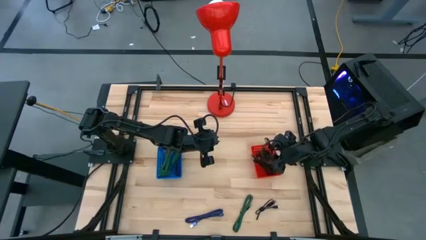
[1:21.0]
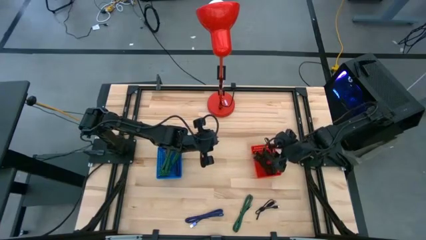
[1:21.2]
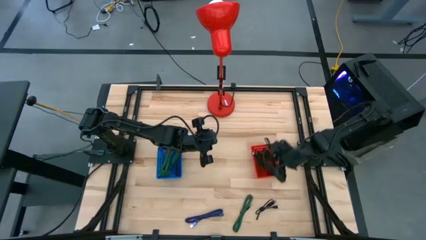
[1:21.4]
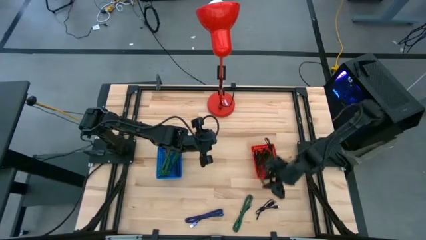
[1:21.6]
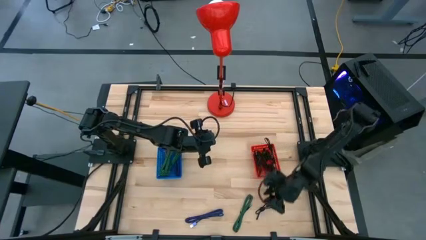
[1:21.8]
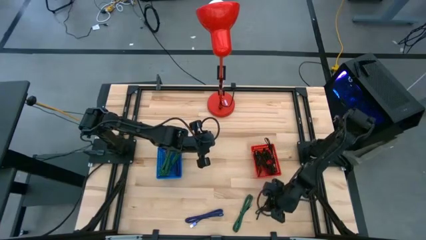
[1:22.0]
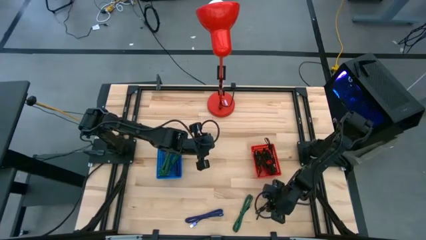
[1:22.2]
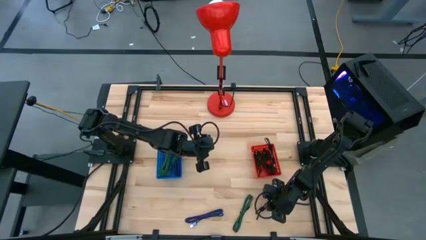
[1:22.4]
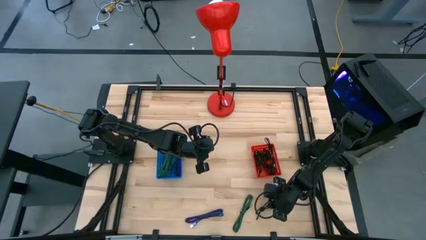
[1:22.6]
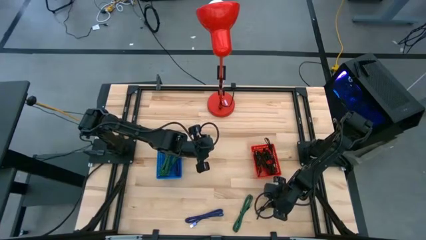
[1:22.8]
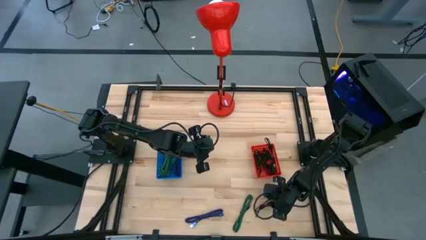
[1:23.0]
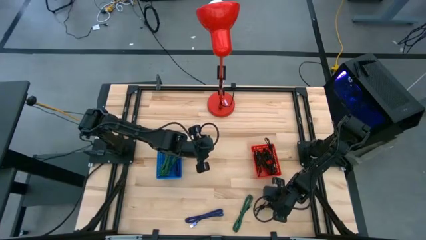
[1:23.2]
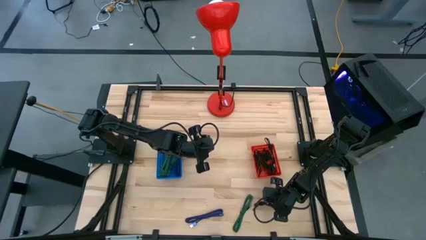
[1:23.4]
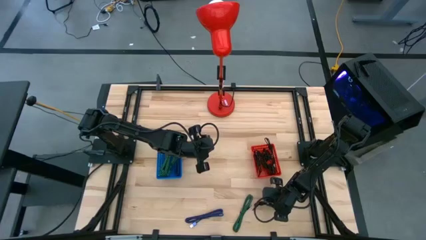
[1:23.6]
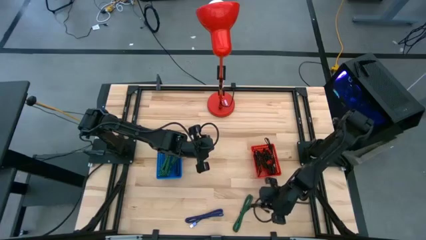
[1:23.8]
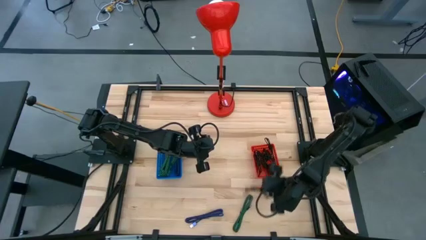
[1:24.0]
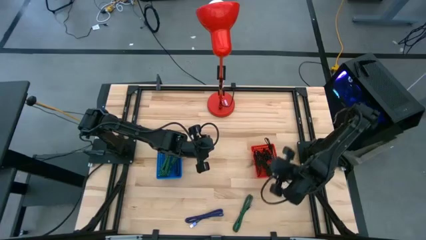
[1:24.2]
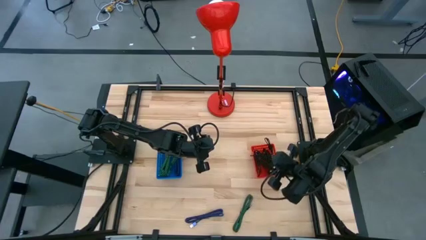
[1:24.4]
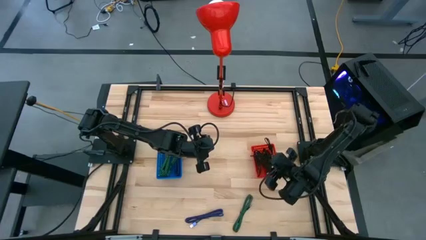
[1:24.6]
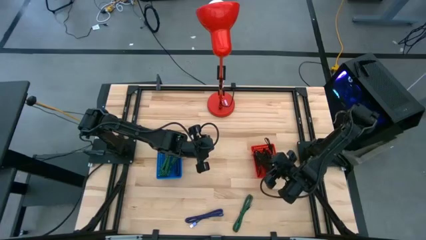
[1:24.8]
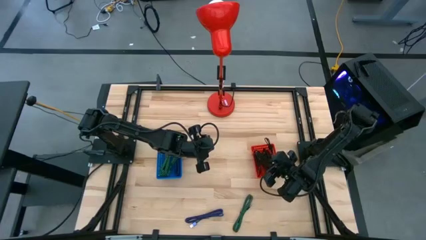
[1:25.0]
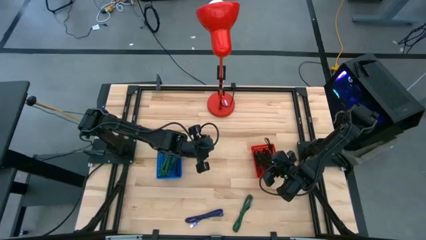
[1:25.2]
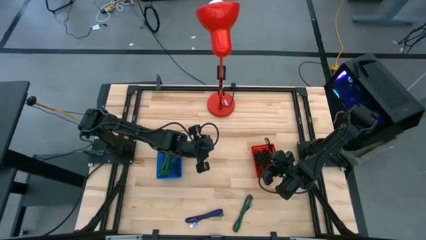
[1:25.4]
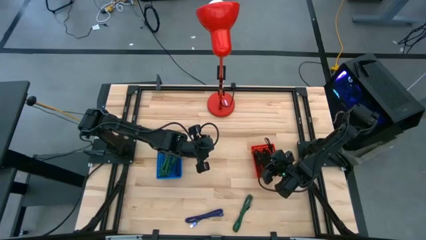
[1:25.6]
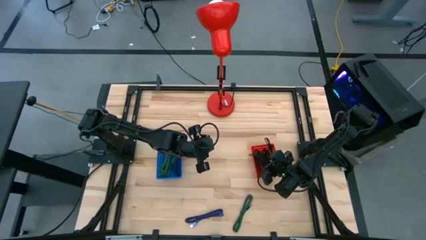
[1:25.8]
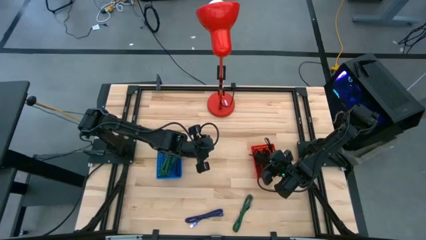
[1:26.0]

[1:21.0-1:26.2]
Task: Pick & Place USB Port
Put the black charger cable into the red bin

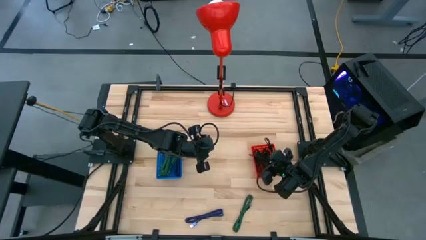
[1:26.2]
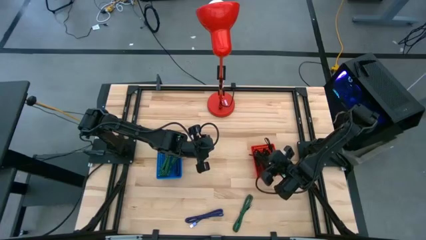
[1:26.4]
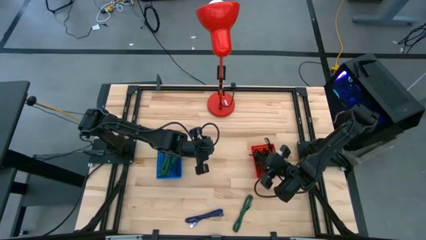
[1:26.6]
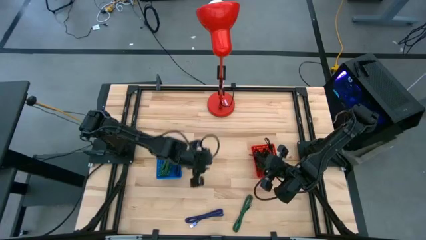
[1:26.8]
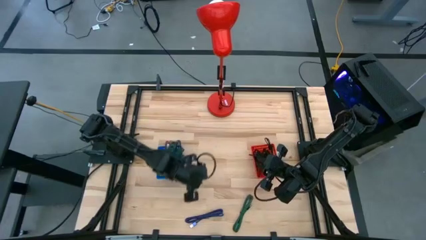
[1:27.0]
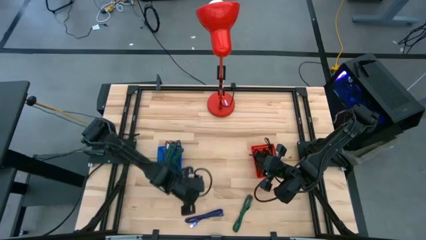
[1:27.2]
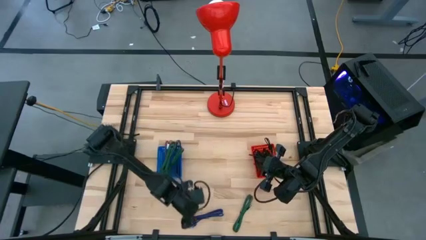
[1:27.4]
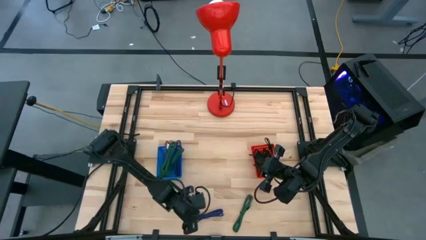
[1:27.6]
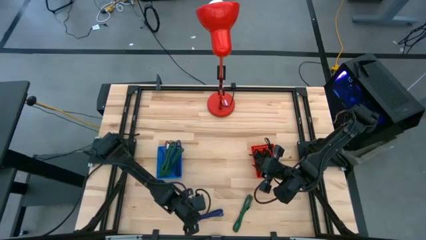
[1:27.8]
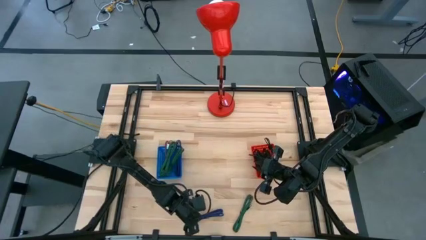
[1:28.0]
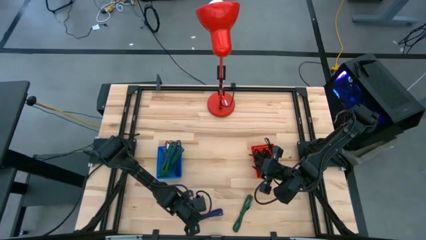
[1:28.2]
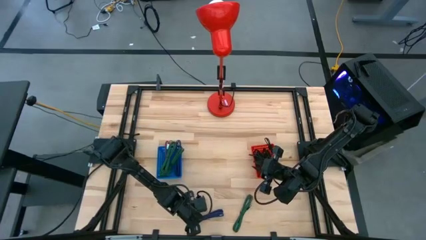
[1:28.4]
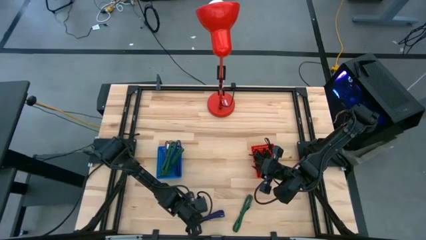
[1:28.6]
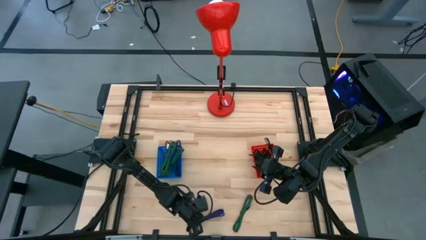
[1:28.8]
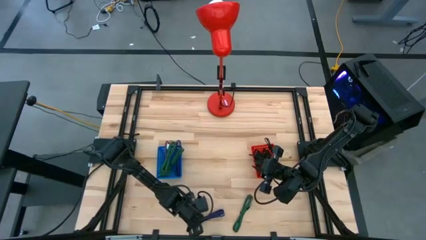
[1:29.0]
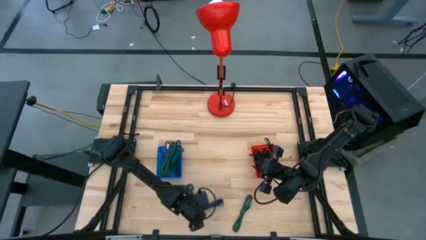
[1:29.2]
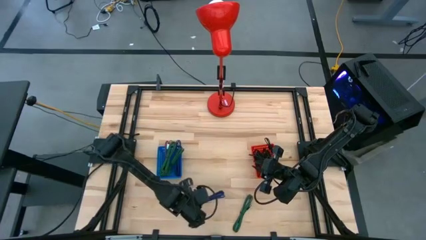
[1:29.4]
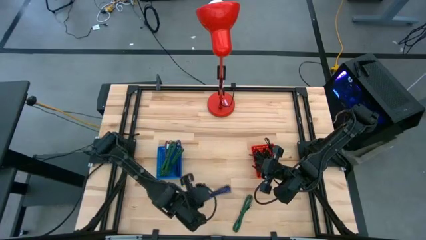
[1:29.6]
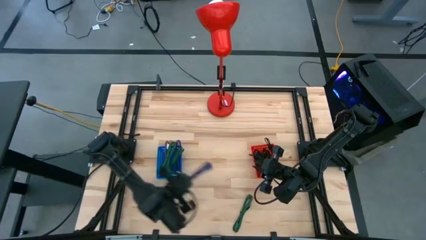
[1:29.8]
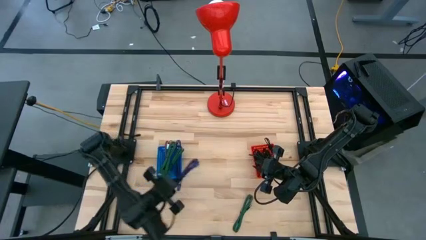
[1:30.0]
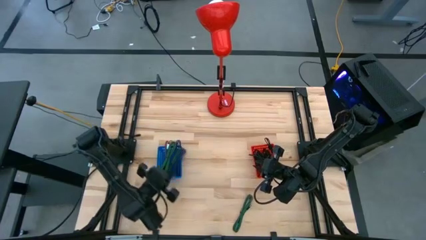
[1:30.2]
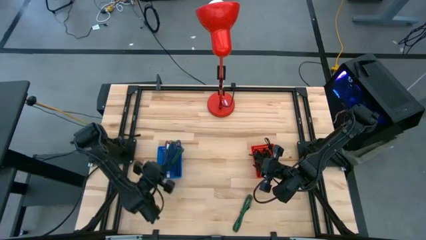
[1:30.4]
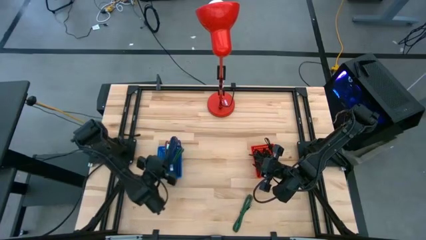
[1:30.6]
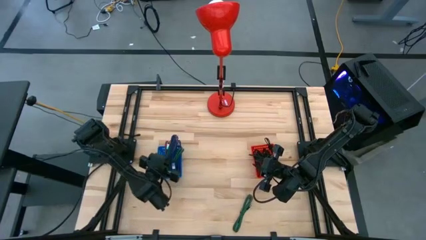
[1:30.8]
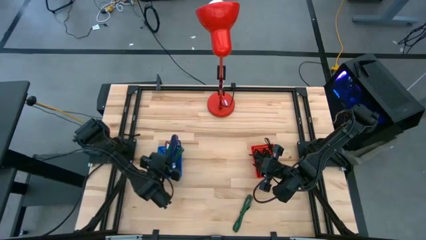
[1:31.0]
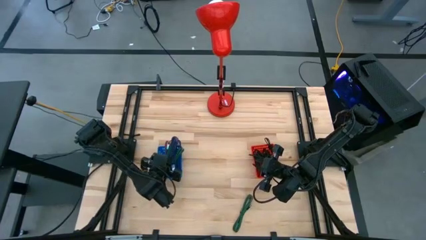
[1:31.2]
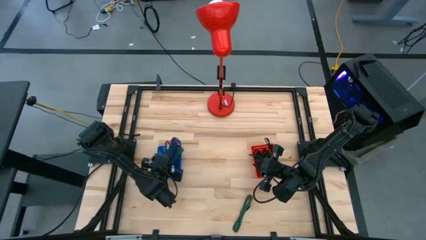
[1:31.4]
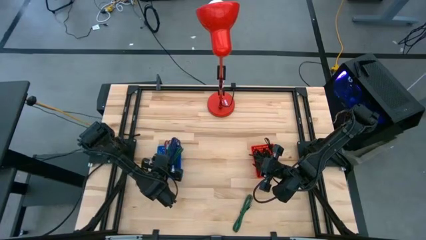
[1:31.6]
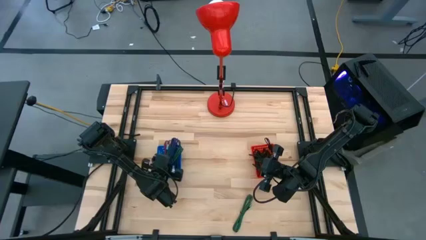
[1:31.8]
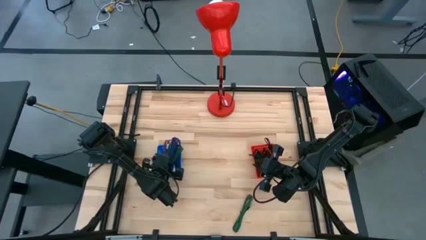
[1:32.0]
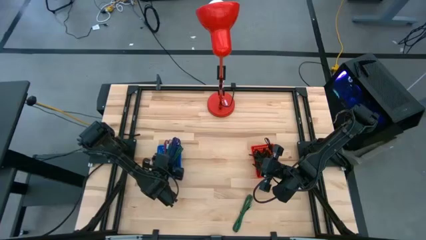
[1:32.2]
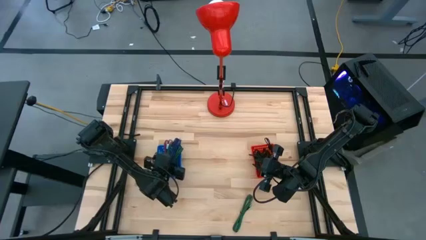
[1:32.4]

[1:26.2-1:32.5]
Put the blue and black charger cable into the blue bin

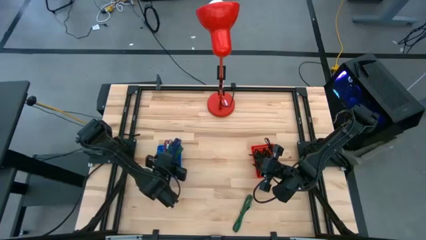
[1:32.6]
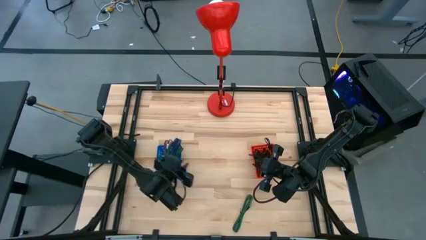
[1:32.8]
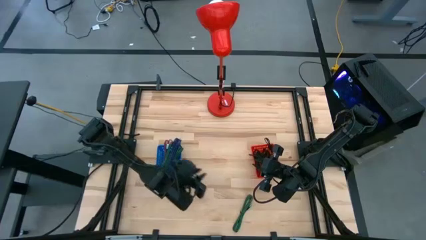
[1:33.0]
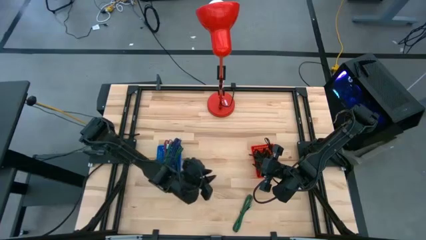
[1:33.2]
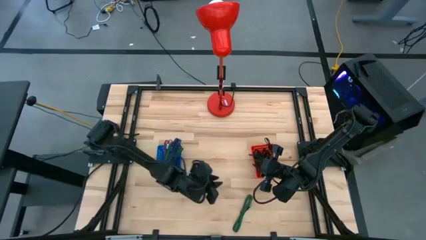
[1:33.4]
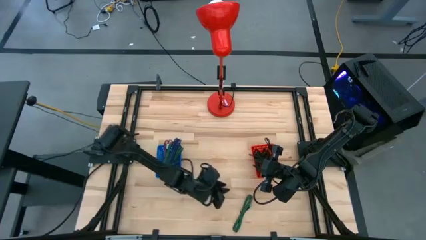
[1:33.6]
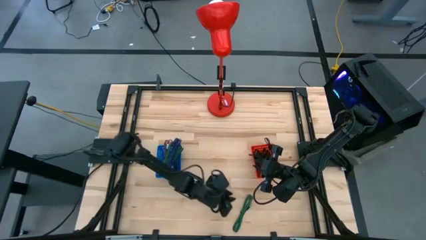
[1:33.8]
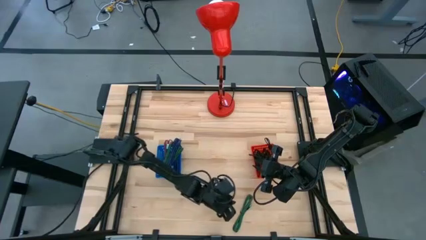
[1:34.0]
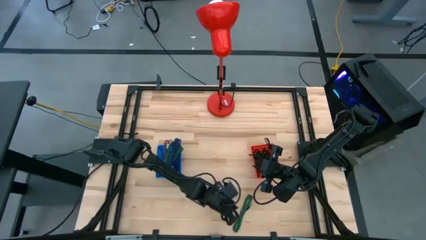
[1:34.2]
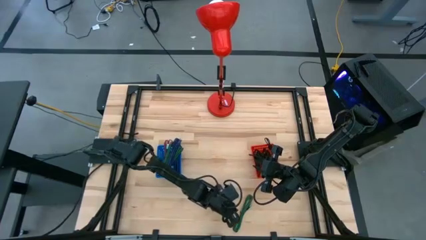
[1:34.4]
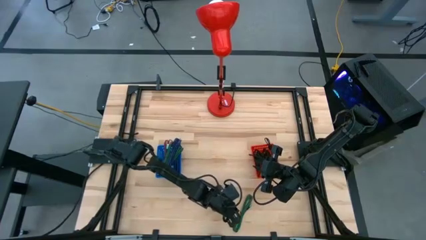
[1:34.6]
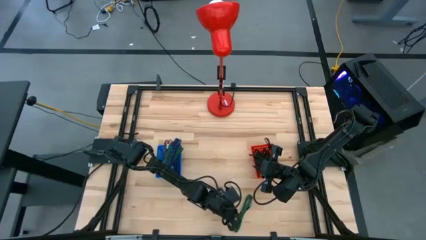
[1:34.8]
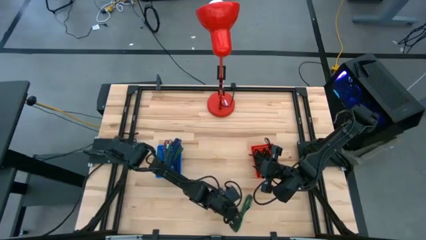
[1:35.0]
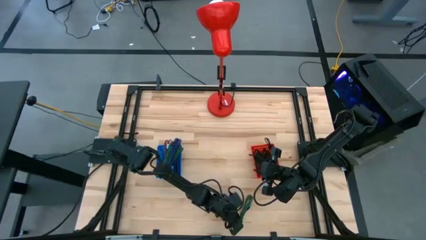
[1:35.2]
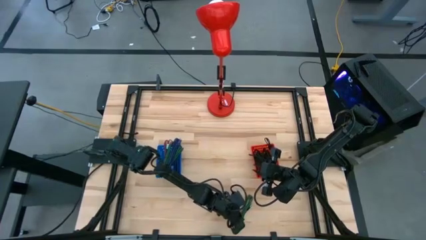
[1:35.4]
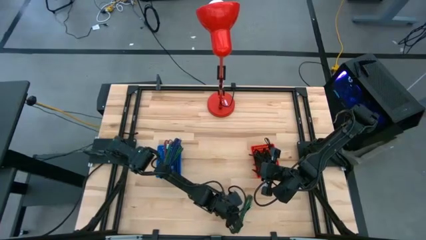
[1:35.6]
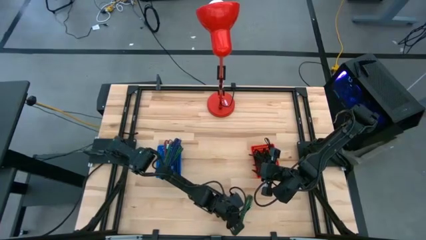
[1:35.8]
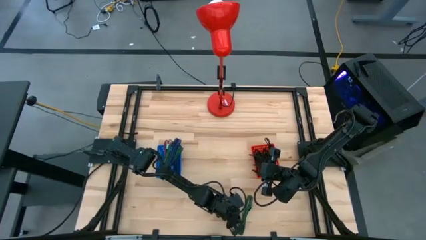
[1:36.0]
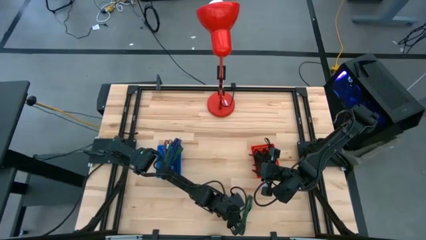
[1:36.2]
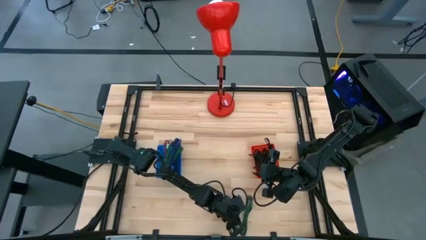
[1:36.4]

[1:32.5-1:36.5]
Put the green and black charger cable into the blue bin
